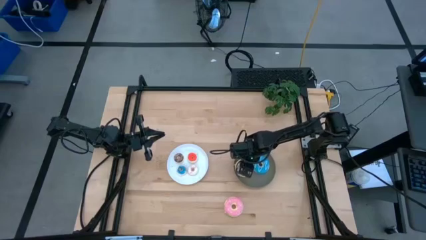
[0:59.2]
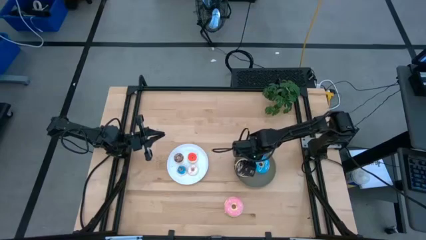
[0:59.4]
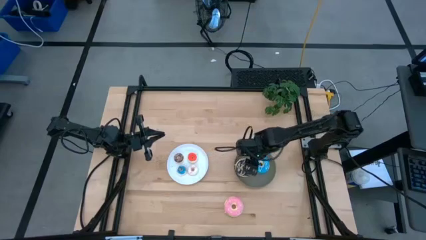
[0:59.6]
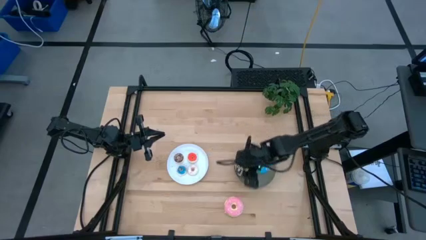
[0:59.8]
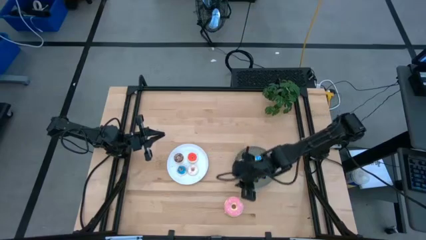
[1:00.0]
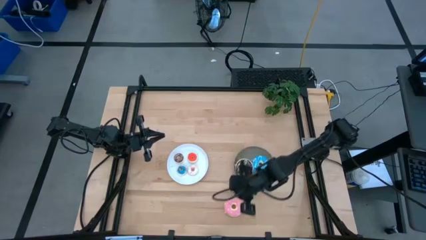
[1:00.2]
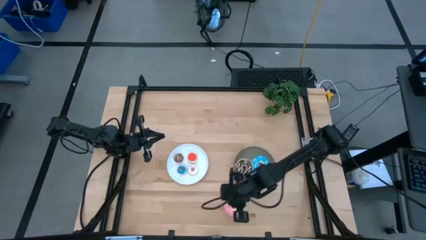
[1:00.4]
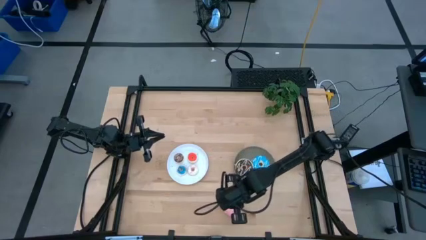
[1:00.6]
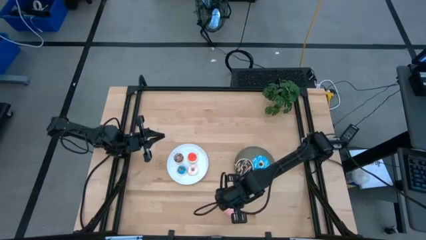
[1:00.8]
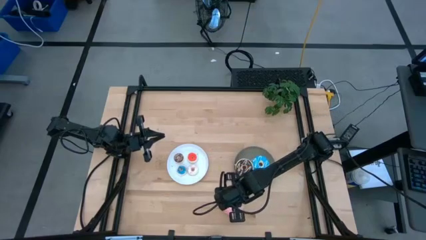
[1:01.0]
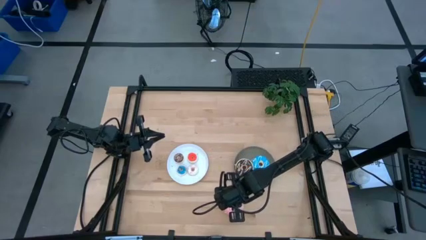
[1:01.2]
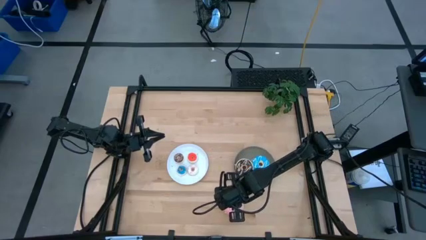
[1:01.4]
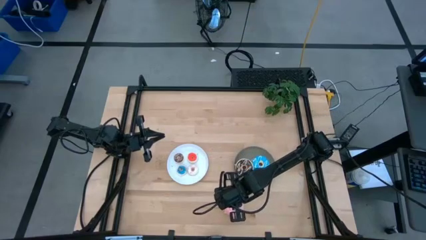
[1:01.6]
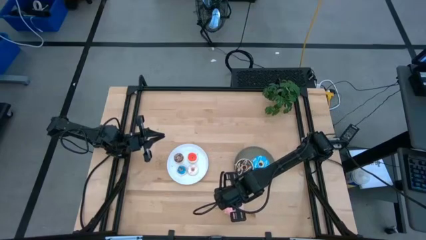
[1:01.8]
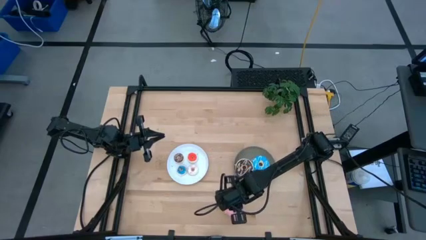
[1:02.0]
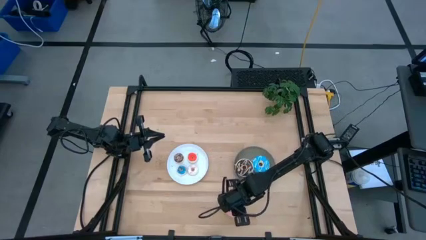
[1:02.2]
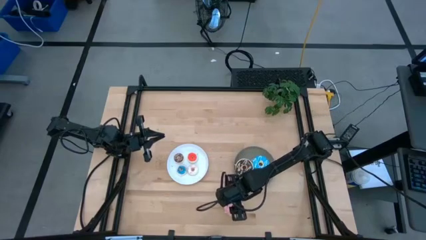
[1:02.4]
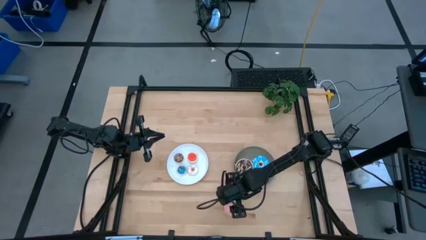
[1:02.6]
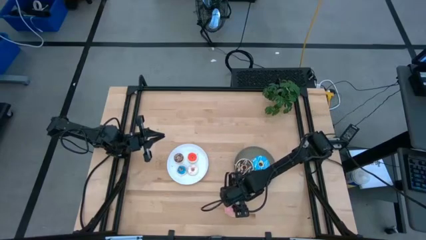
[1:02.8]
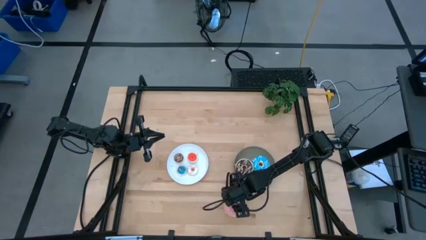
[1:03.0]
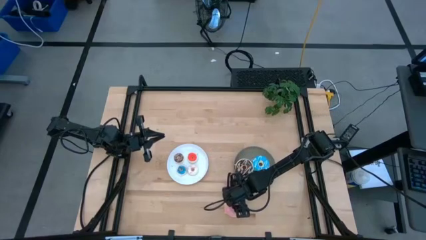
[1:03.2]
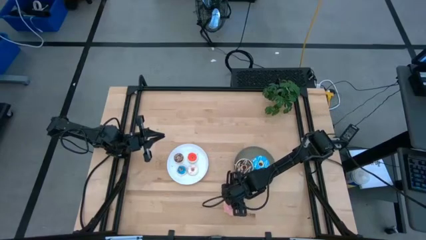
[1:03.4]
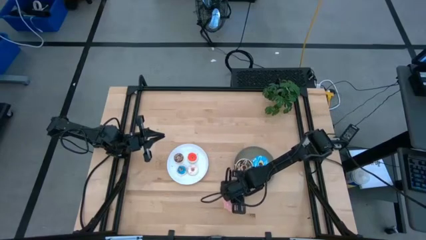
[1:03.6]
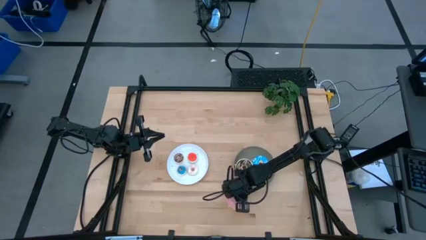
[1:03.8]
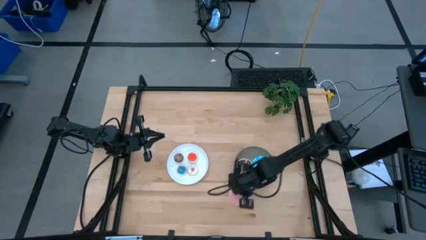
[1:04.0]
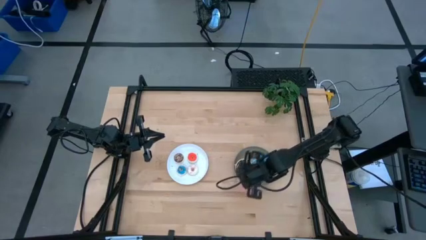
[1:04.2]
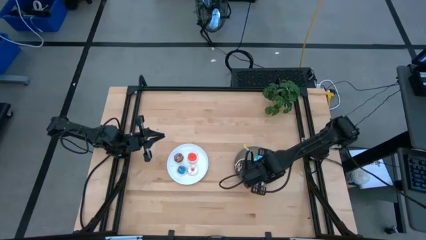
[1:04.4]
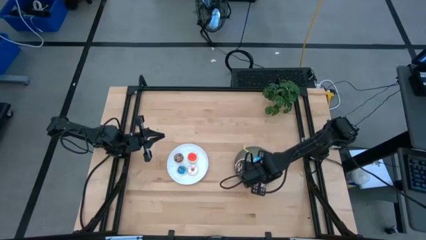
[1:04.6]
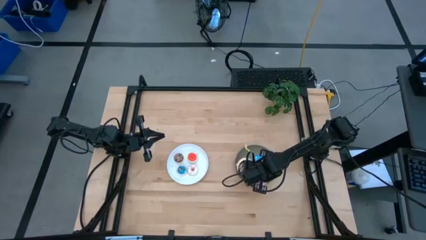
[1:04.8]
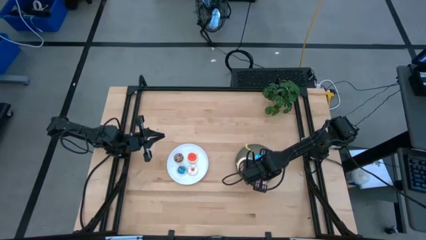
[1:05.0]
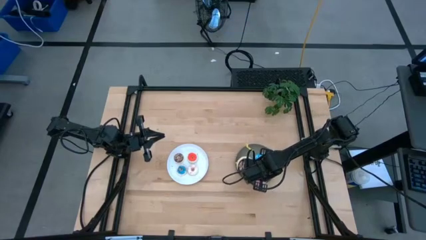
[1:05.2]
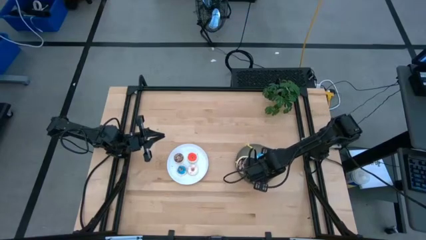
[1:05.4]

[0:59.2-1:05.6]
Task: Pick & Place donuts
Put the large pink and white donut on the gray plate

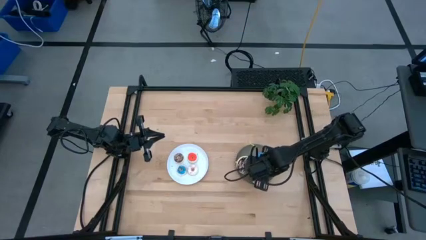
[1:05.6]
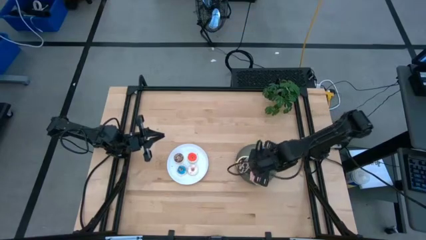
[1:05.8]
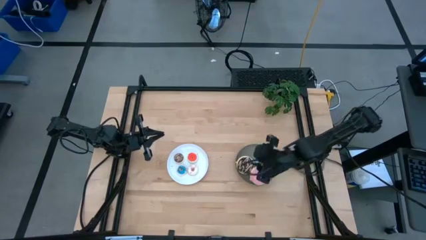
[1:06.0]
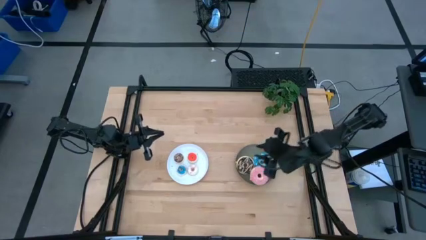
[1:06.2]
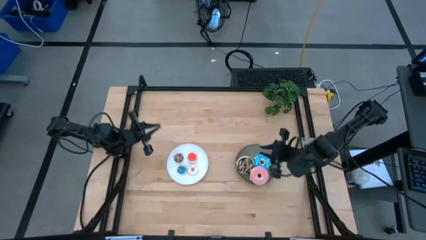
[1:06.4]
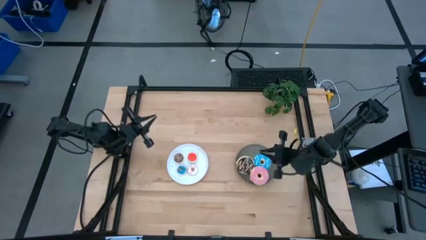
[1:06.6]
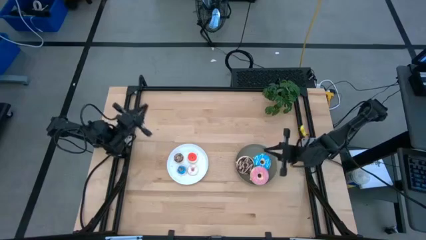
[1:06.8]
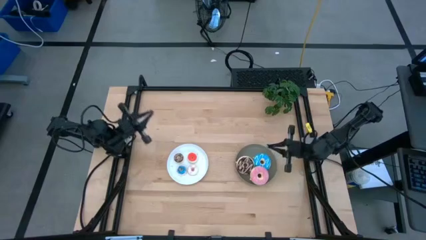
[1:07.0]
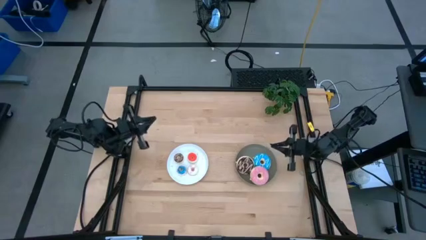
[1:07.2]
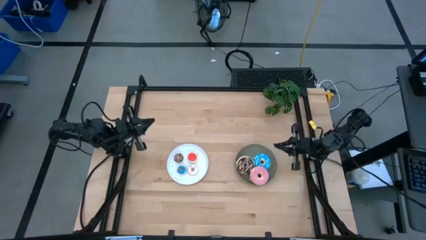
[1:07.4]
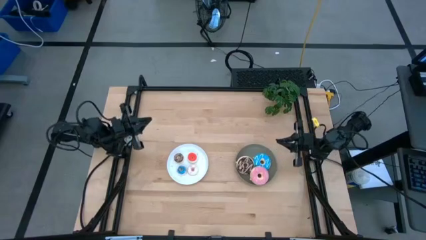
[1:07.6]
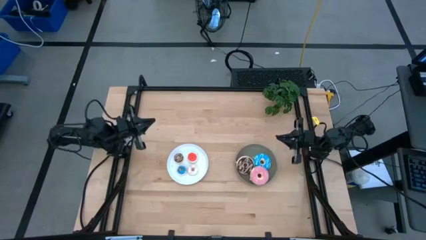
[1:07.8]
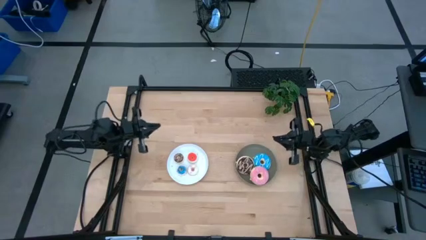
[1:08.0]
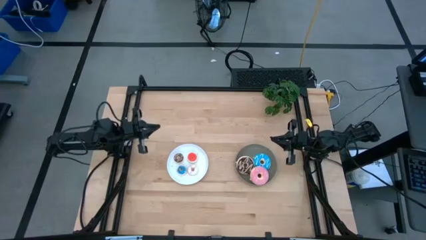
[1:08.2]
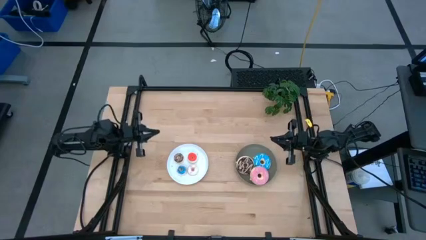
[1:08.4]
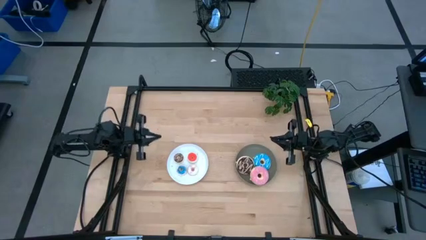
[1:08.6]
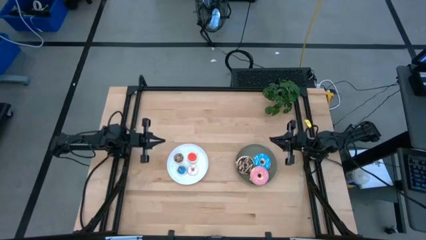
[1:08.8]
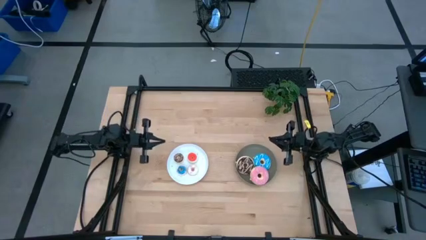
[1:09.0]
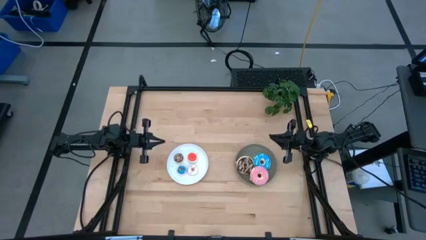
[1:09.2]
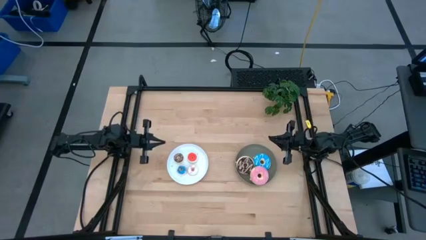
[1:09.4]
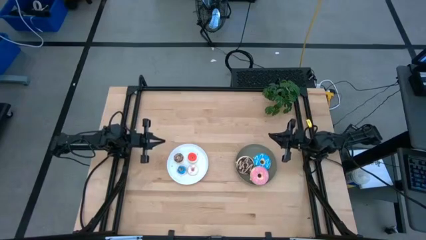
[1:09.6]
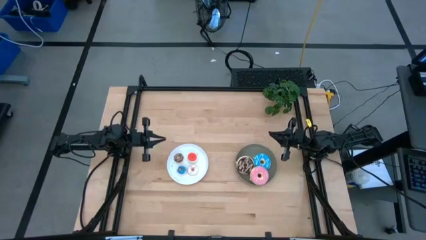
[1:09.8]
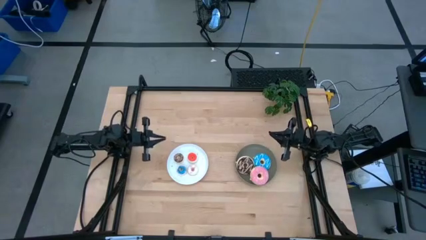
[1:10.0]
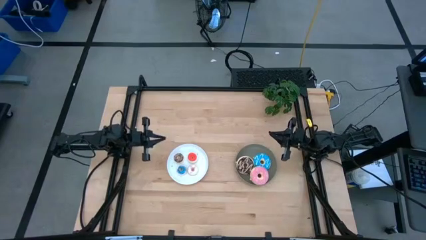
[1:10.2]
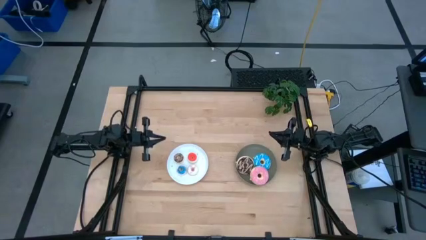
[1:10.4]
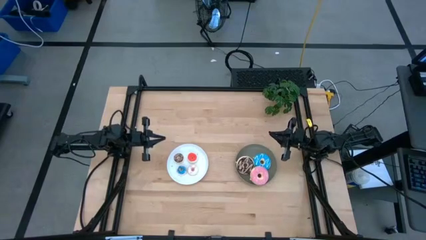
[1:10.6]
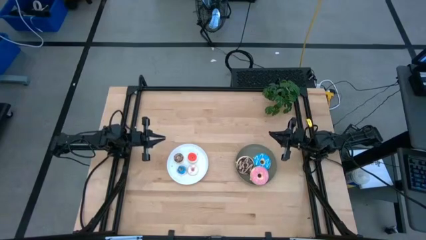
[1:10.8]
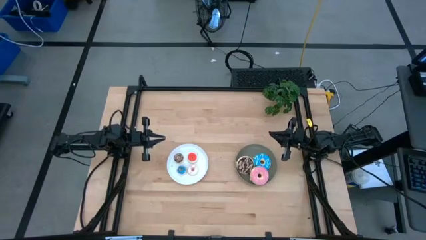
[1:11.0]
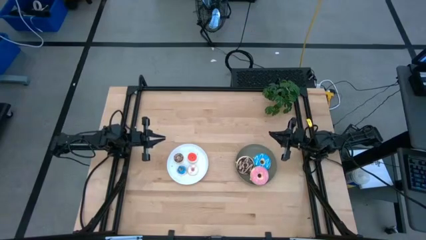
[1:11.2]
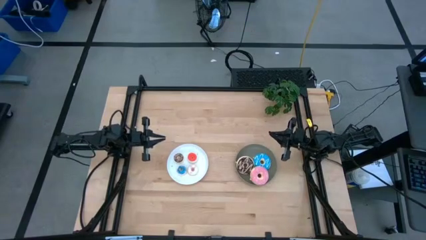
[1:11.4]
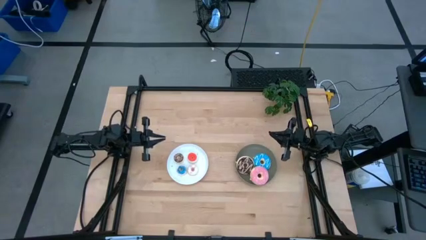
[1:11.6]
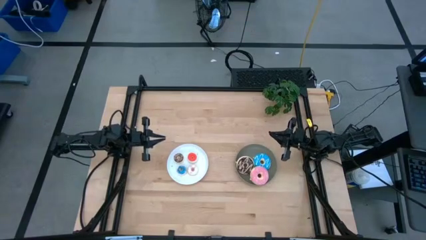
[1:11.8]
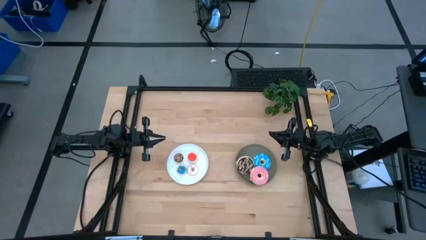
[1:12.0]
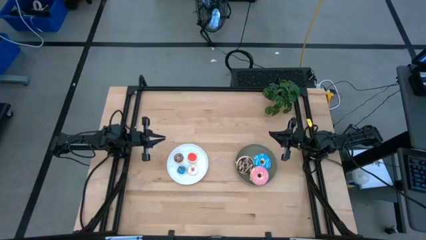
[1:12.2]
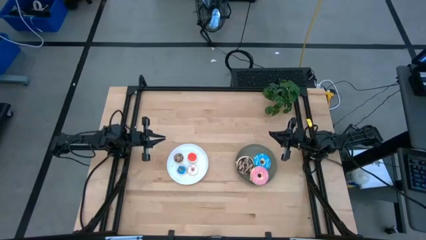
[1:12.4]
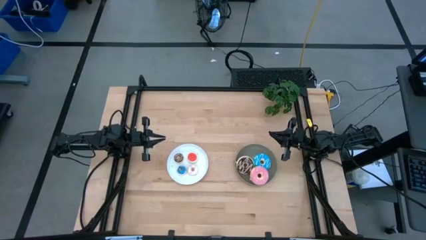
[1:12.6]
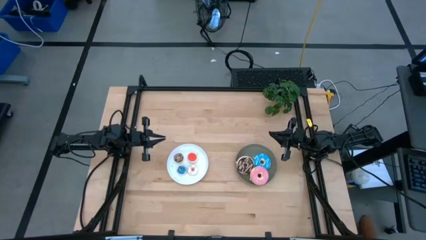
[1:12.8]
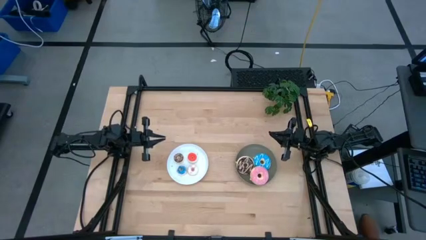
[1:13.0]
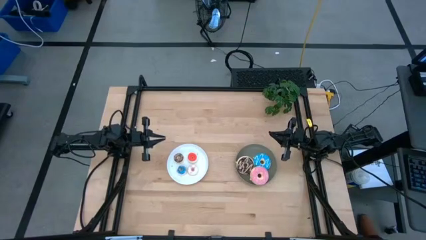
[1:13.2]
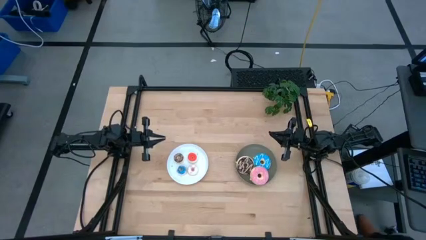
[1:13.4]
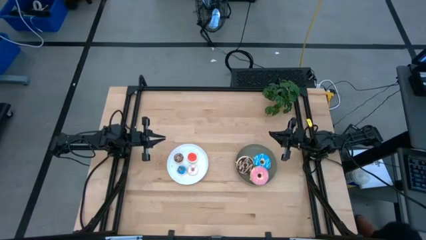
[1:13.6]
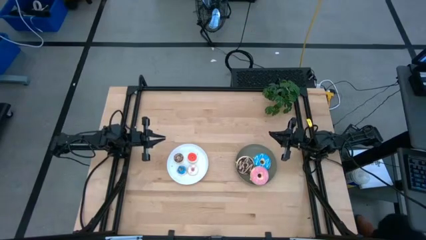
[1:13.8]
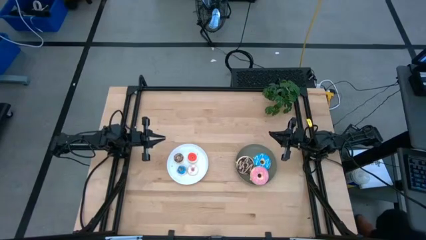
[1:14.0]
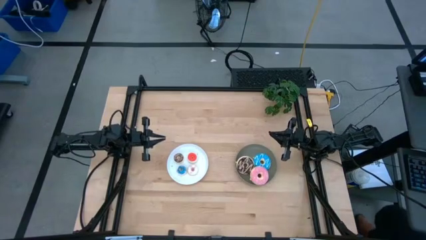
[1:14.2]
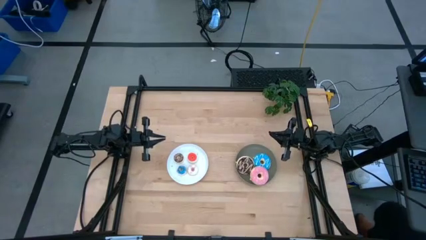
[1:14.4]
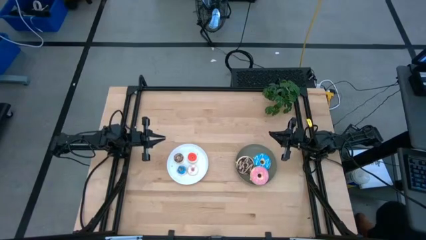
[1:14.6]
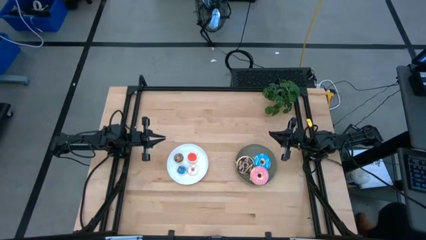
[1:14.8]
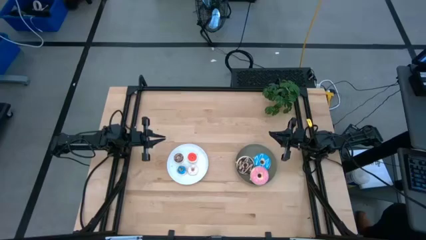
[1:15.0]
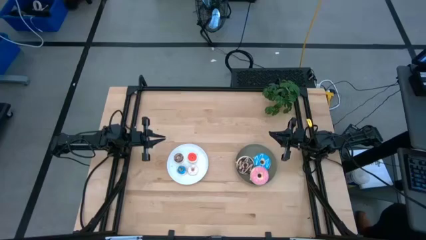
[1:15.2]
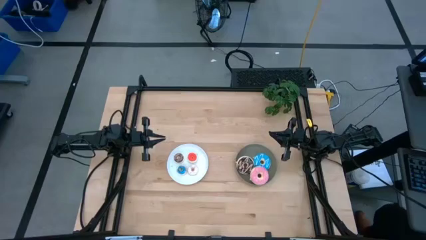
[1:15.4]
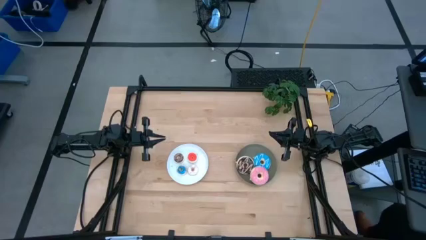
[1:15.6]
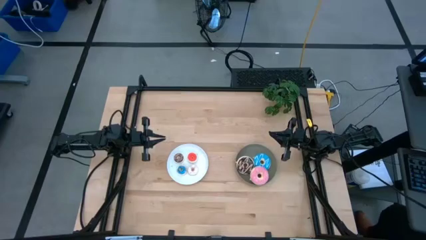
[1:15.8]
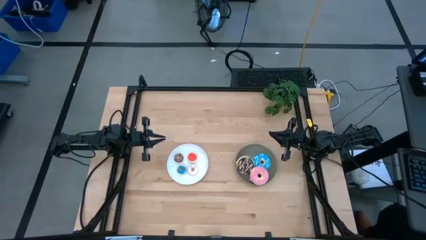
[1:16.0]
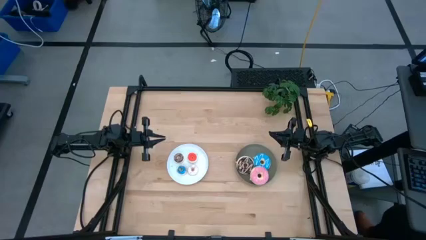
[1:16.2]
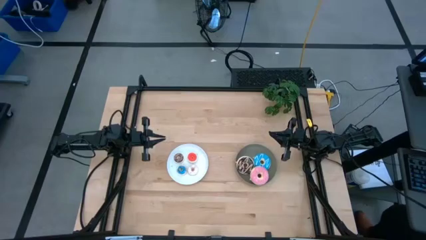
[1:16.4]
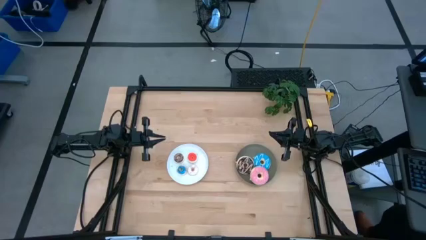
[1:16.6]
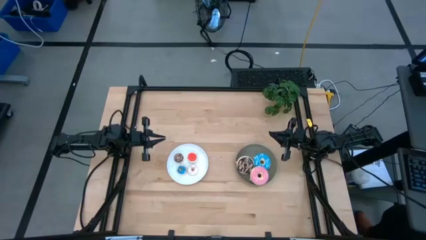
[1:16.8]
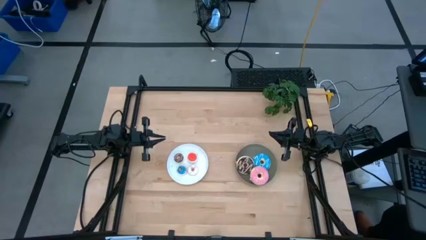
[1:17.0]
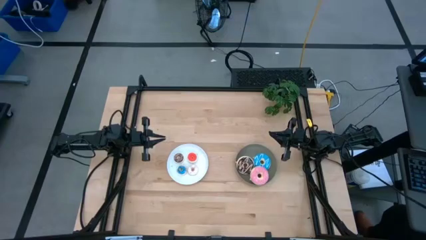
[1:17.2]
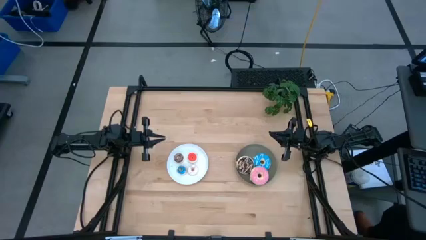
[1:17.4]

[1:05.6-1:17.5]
Return to Home Position
